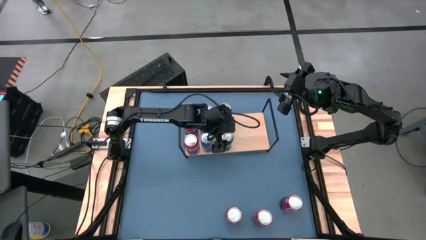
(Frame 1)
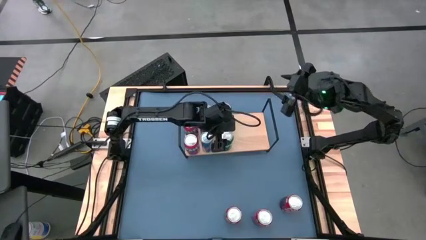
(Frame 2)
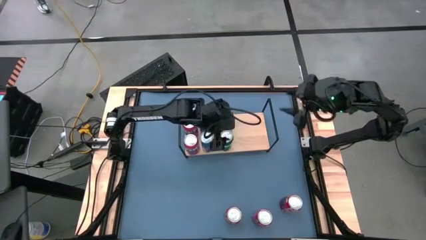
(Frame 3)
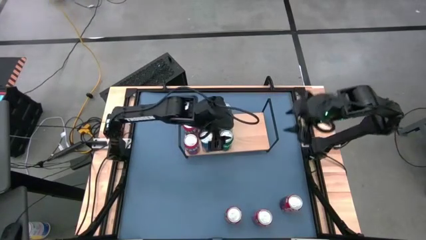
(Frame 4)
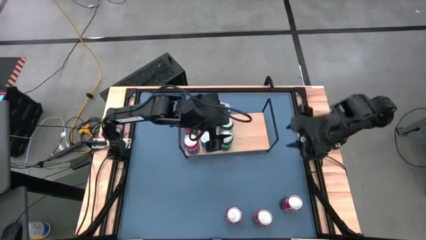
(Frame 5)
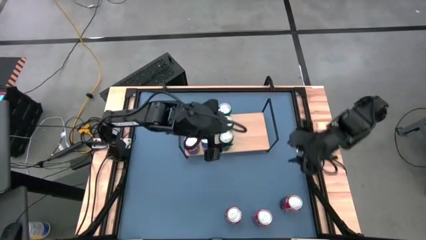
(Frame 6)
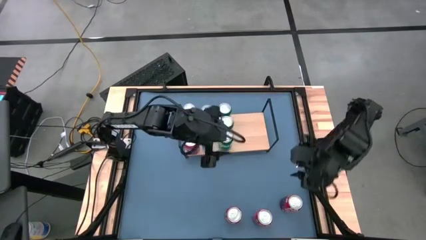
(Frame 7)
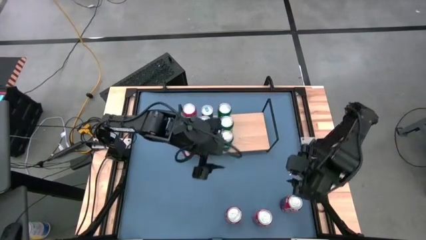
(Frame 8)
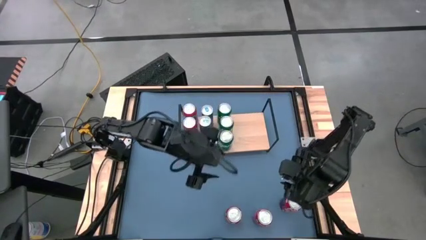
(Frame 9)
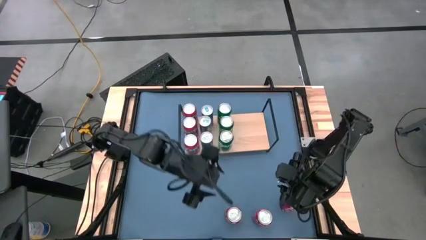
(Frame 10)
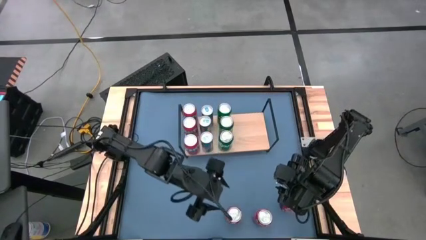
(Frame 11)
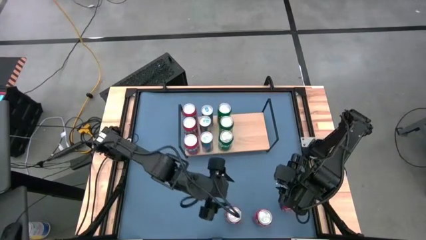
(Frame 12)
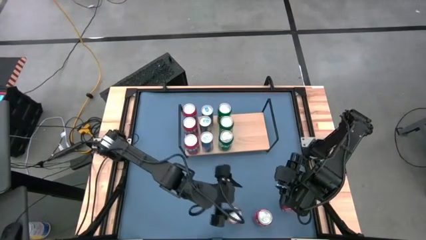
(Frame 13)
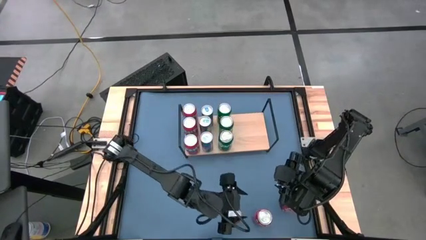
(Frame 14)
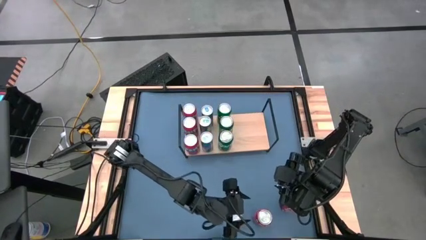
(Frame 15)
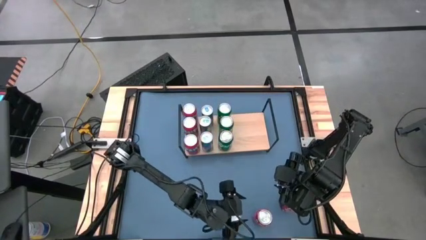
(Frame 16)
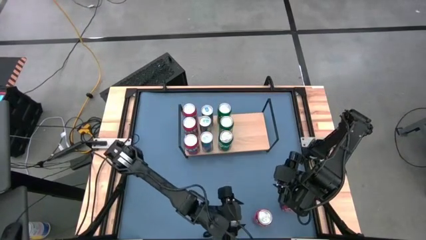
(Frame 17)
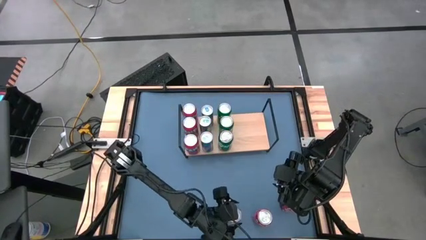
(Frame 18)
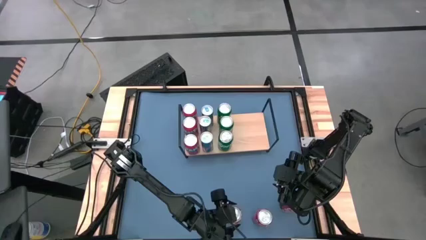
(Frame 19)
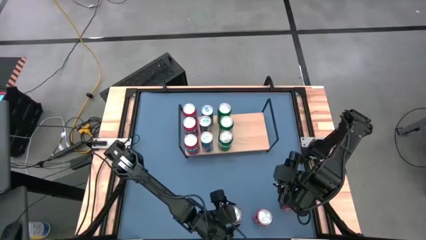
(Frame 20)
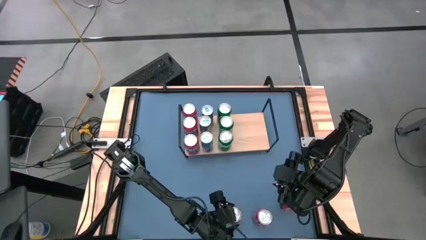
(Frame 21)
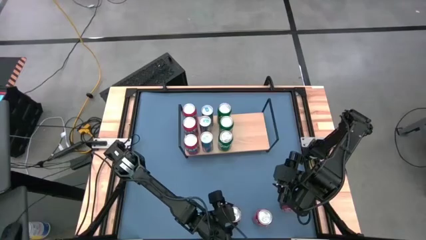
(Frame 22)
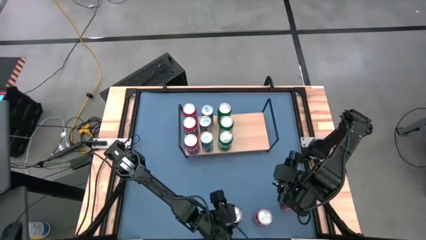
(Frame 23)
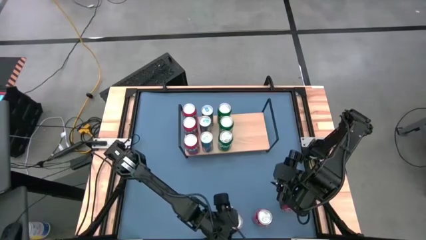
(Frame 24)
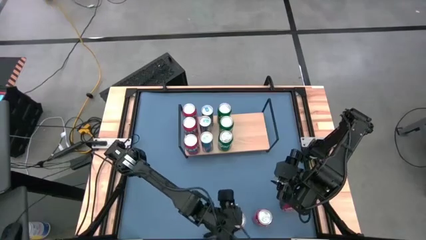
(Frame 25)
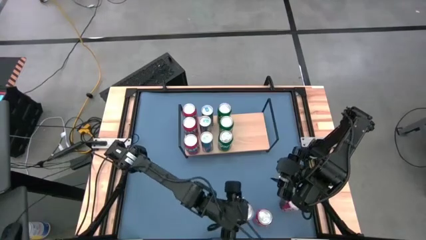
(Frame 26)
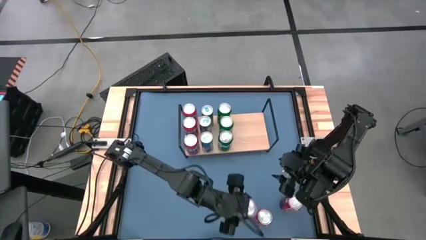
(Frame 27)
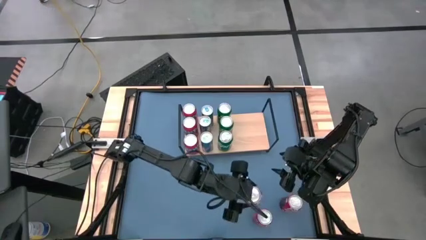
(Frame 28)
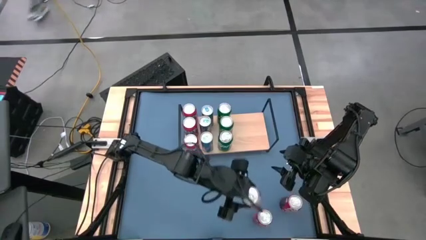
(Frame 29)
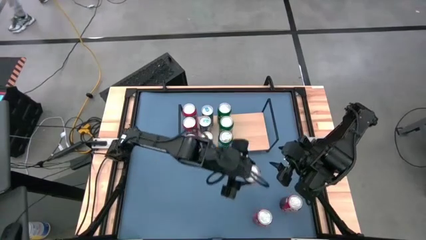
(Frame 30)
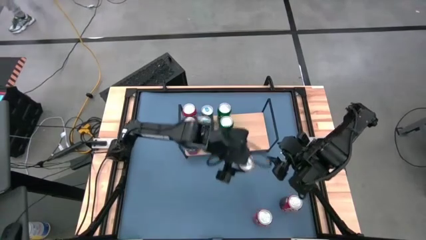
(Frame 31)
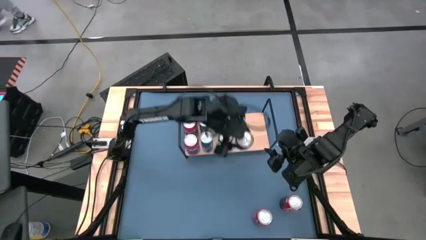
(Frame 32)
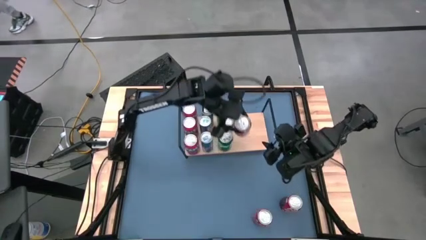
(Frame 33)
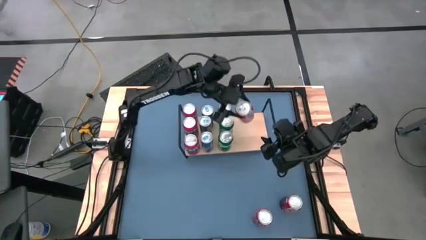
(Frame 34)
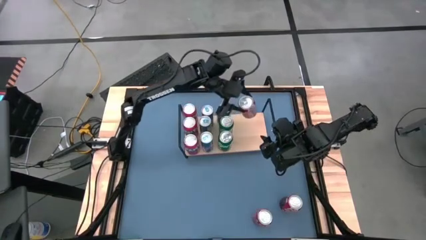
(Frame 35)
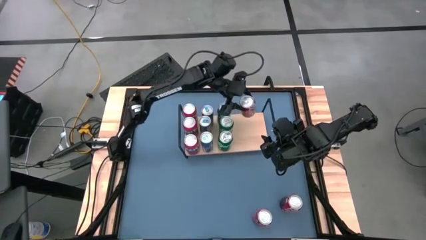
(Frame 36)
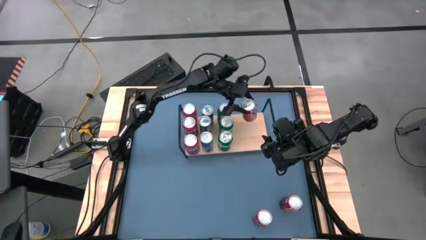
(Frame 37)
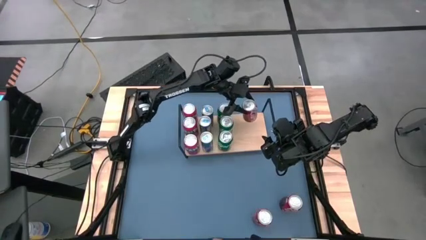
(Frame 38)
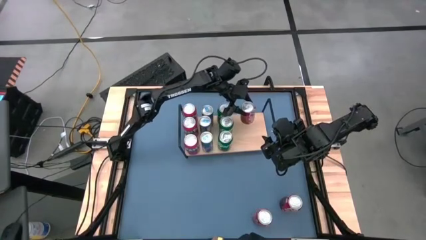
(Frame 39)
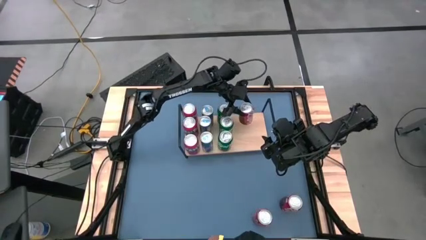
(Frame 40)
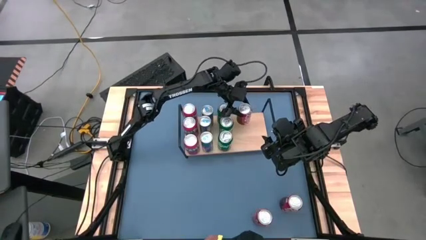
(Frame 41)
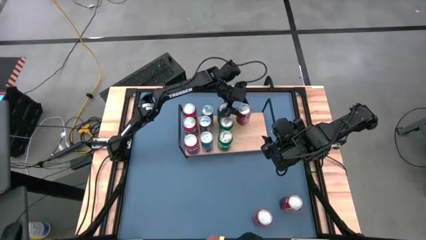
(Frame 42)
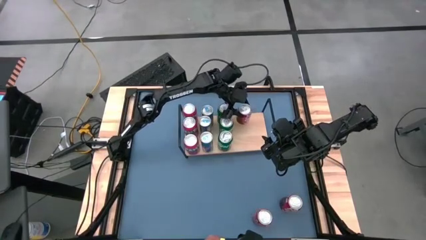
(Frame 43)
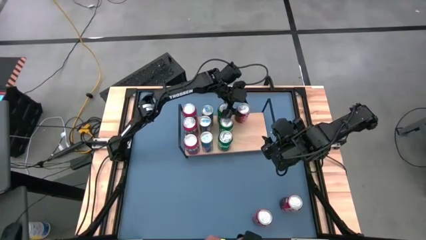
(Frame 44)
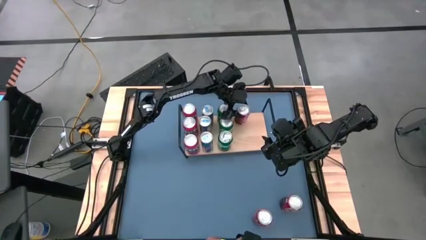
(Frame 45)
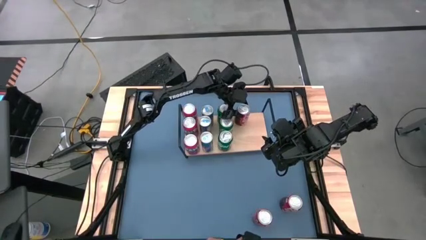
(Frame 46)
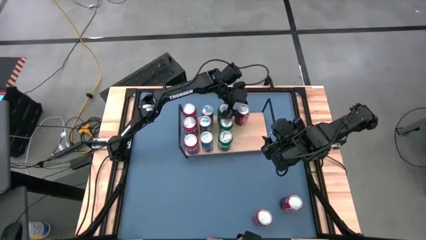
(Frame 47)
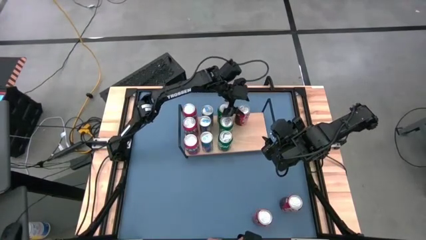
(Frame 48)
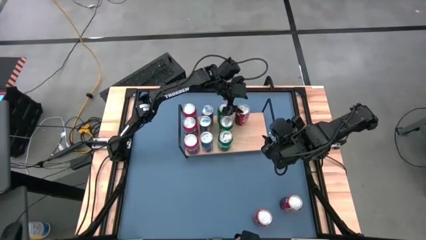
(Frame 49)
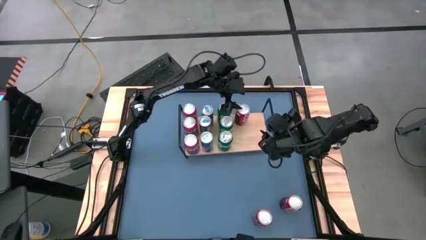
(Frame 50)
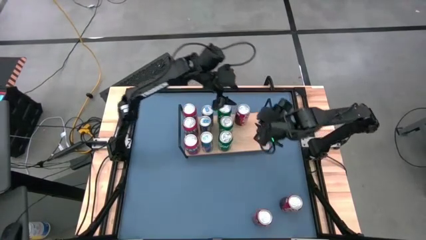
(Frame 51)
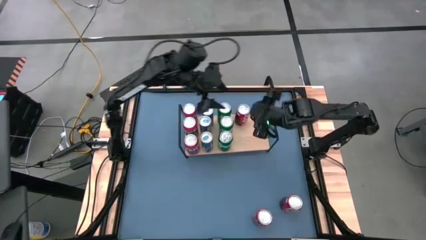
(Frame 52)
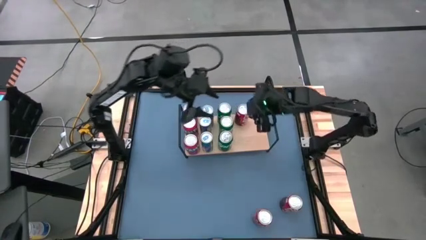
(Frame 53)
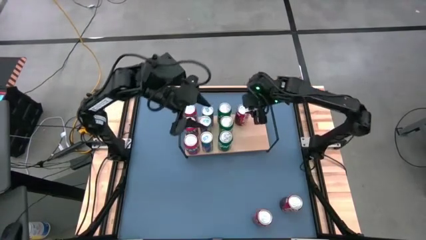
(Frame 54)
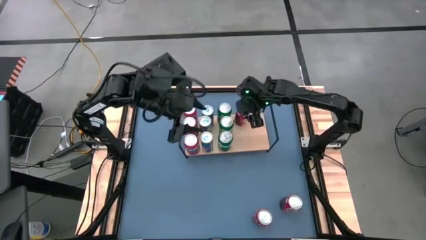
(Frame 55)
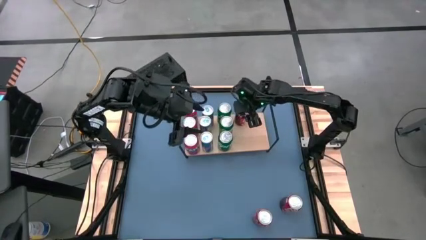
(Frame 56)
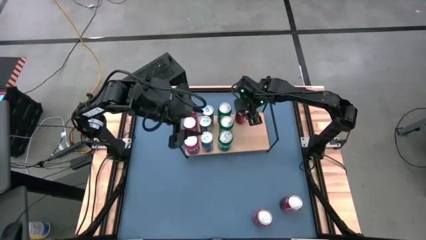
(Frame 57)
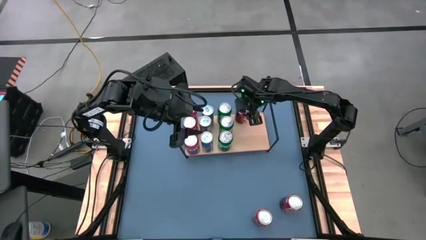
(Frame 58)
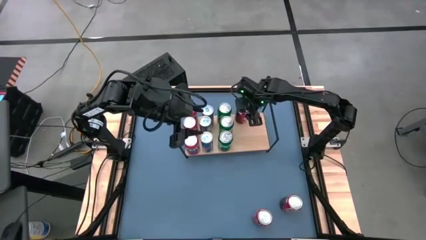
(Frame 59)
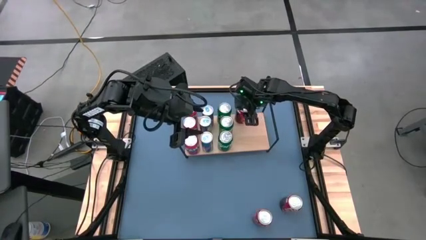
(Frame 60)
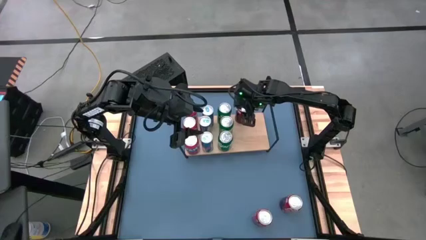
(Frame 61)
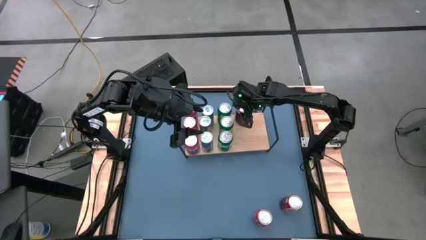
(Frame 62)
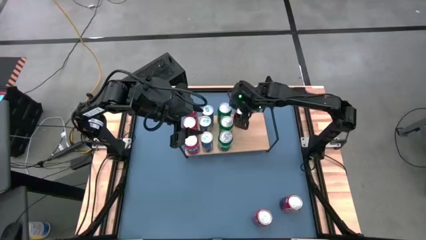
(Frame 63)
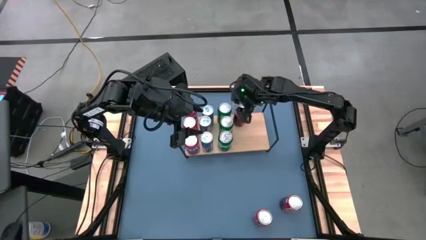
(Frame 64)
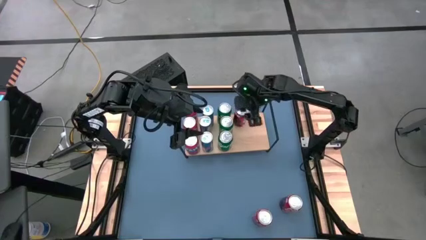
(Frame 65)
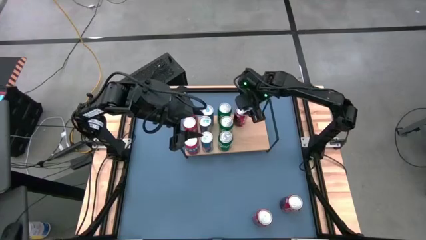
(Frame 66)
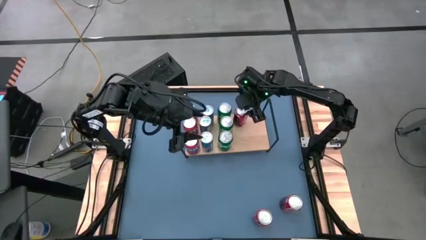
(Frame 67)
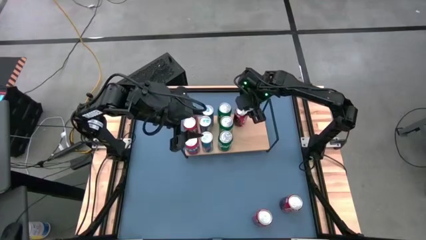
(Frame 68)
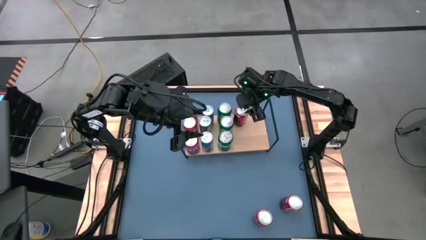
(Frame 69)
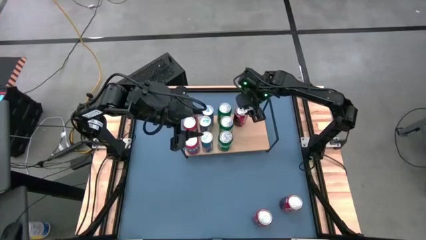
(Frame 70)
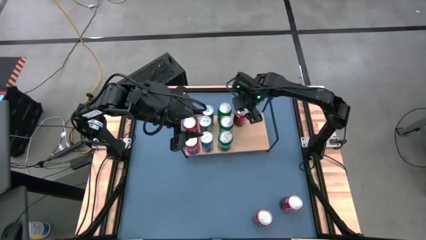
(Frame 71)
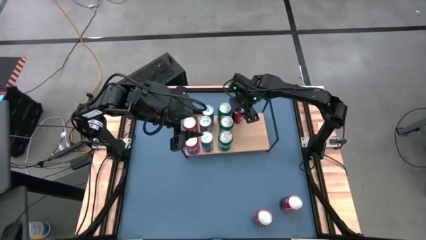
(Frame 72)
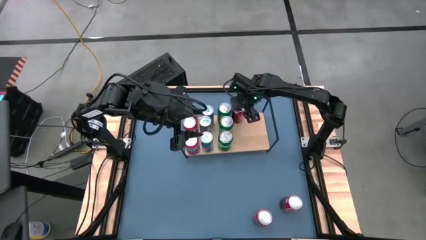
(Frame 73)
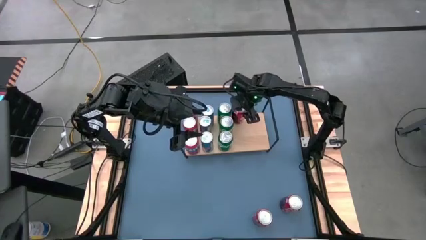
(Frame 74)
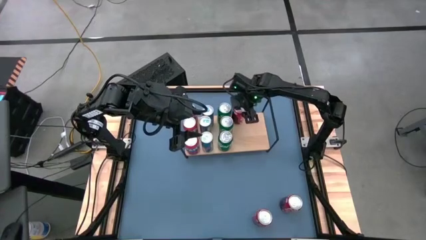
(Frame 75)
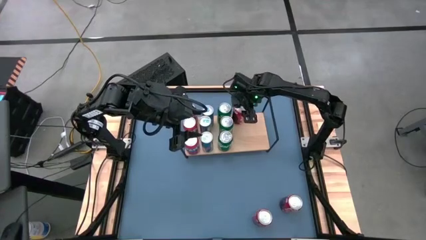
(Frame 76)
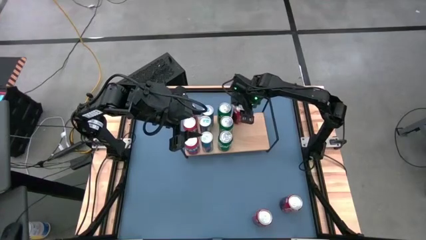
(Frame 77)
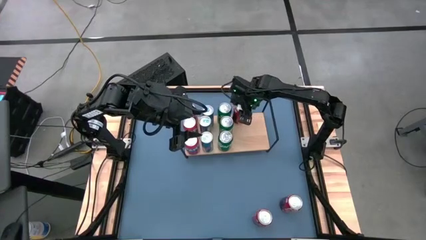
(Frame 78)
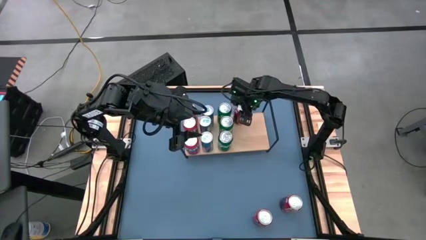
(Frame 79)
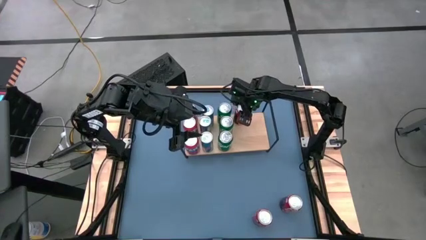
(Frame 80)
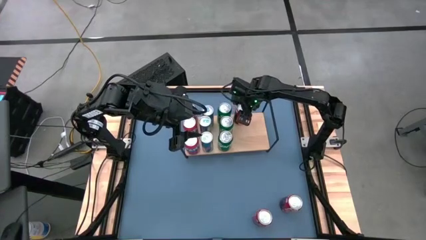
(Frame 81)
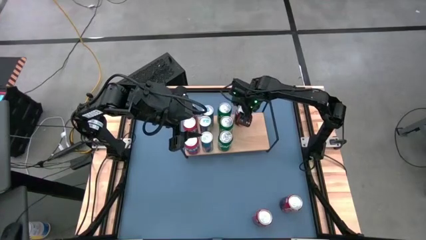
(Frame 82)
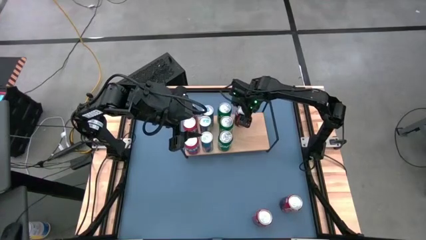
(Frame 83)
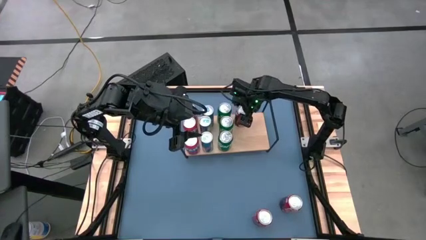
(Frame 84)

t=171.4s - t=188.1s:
Task: Place canned beverage on shelf
Put the red soda can on the shelf
